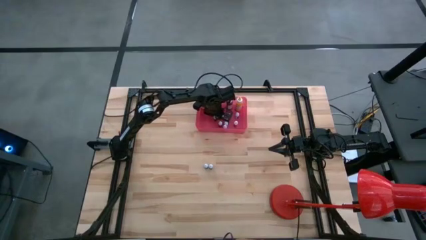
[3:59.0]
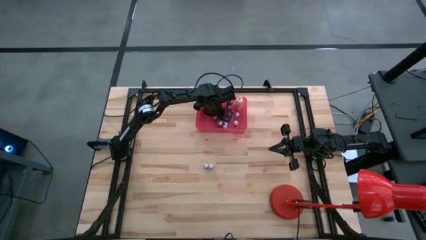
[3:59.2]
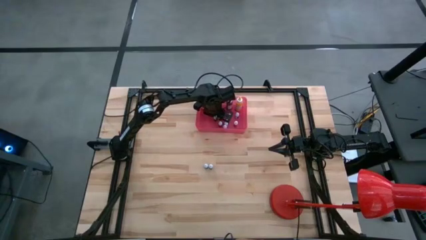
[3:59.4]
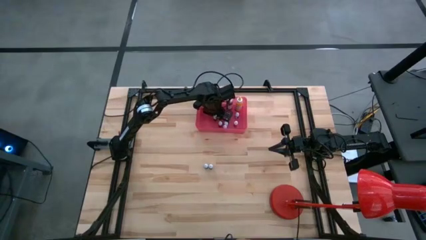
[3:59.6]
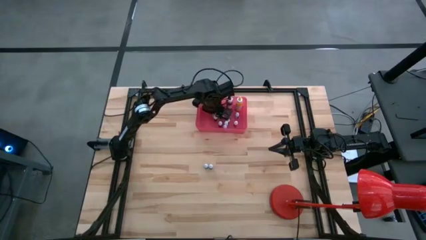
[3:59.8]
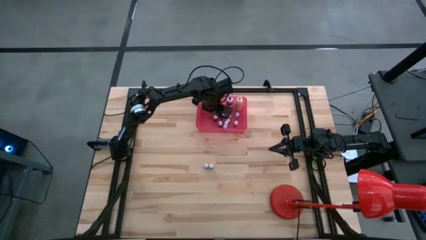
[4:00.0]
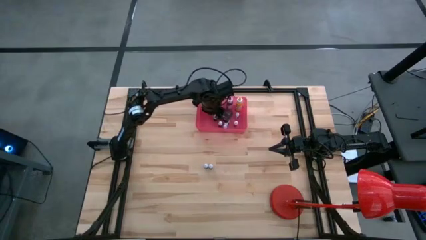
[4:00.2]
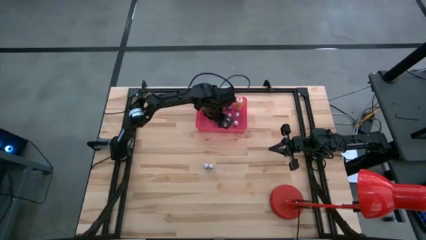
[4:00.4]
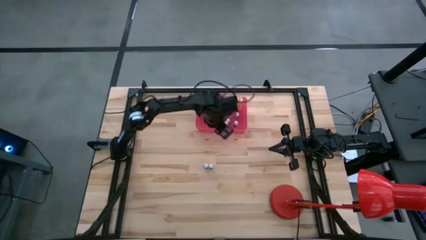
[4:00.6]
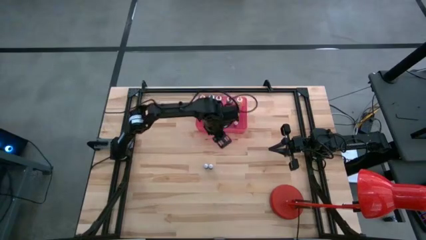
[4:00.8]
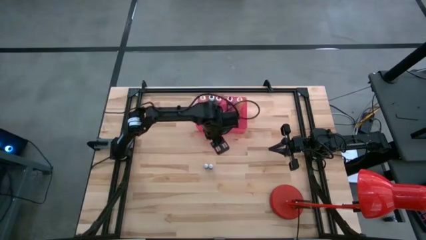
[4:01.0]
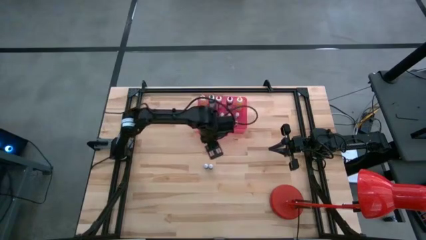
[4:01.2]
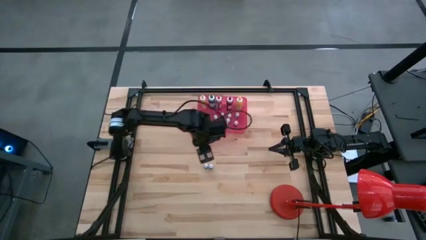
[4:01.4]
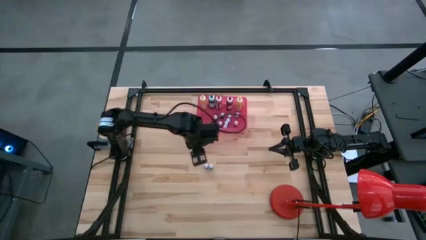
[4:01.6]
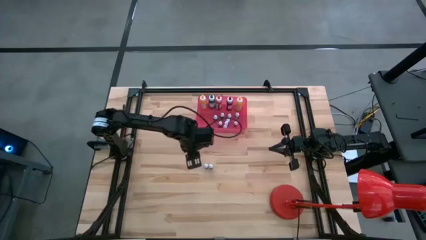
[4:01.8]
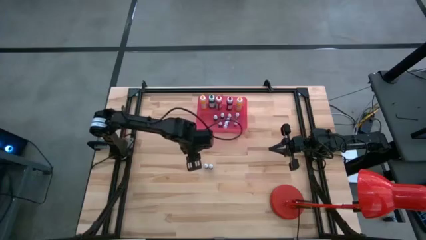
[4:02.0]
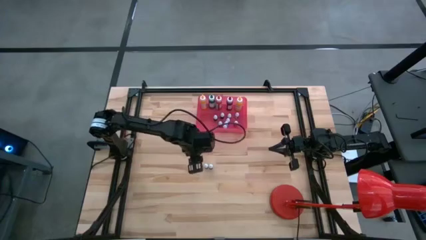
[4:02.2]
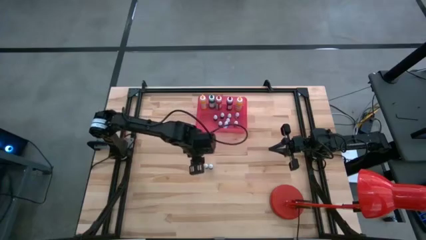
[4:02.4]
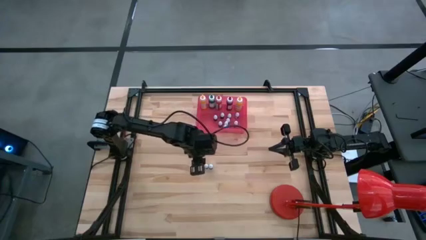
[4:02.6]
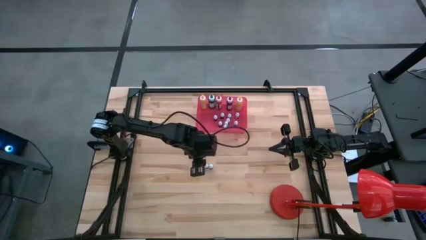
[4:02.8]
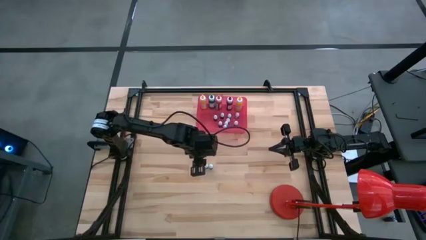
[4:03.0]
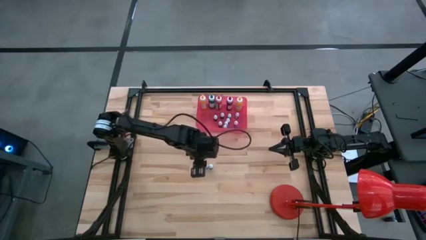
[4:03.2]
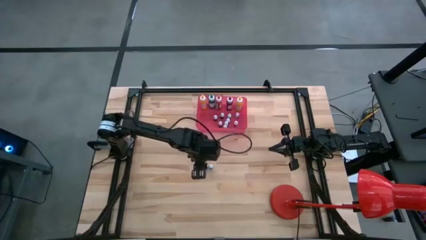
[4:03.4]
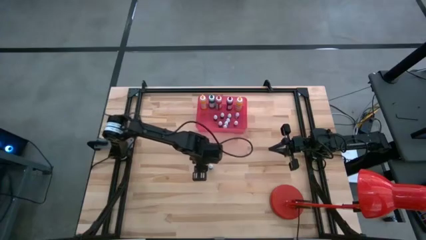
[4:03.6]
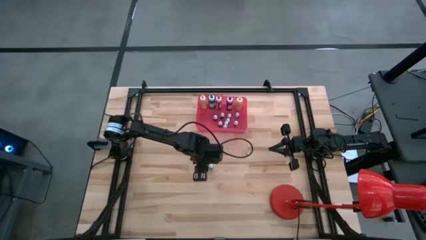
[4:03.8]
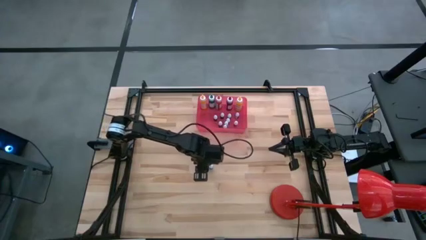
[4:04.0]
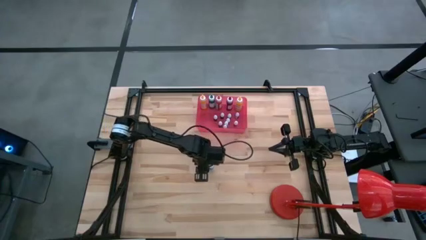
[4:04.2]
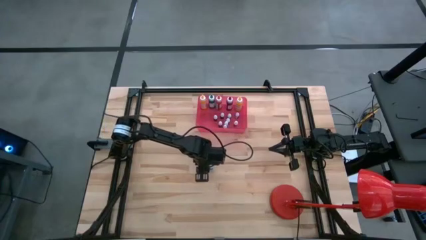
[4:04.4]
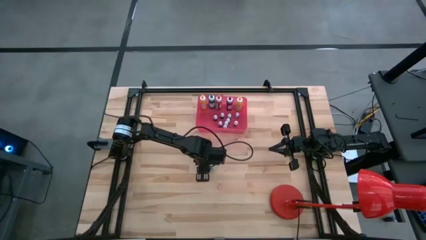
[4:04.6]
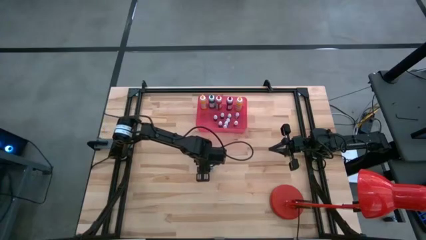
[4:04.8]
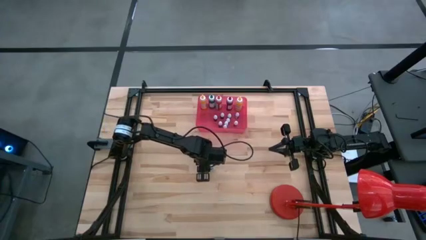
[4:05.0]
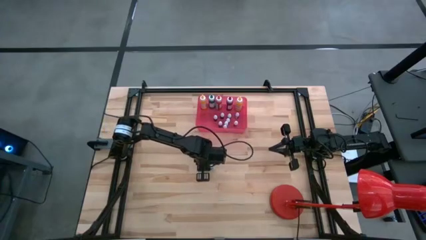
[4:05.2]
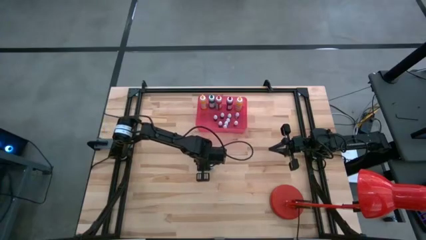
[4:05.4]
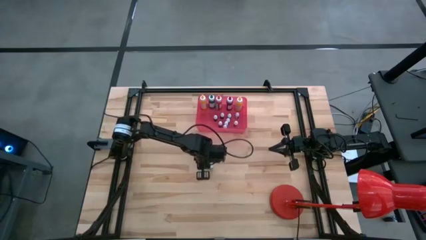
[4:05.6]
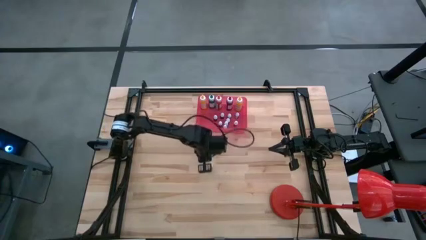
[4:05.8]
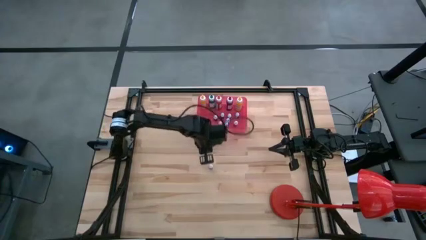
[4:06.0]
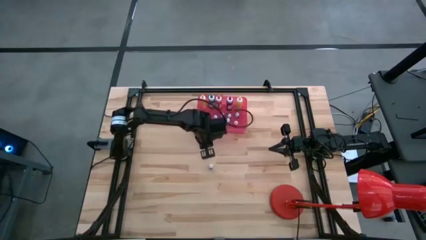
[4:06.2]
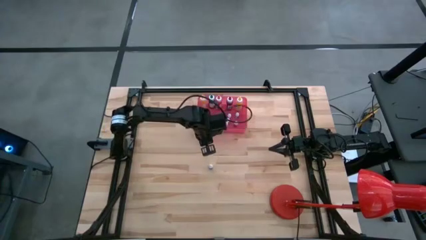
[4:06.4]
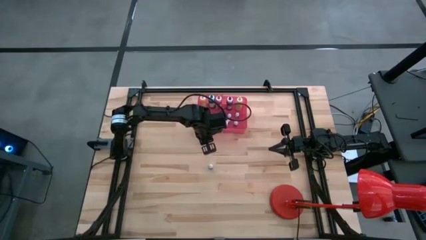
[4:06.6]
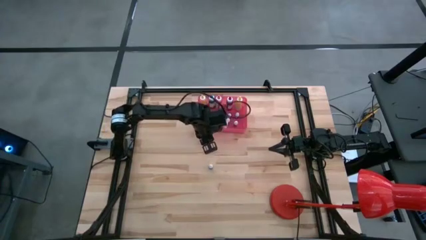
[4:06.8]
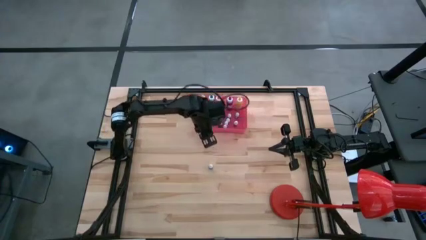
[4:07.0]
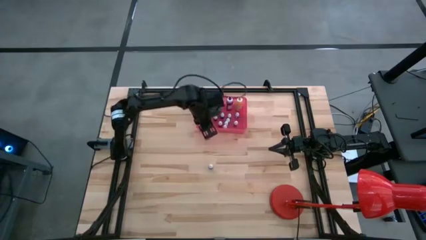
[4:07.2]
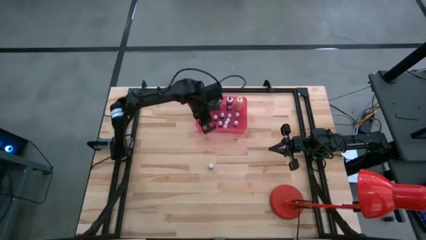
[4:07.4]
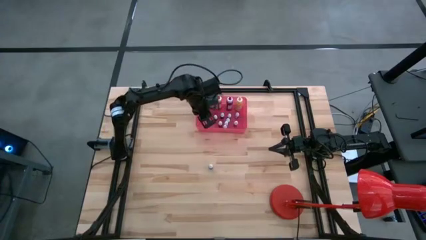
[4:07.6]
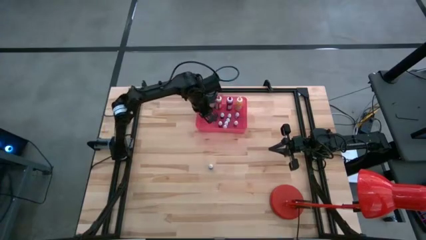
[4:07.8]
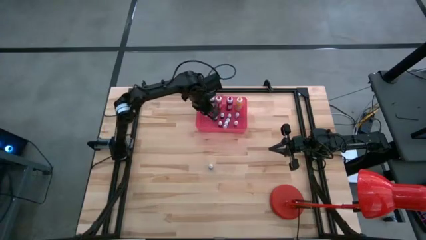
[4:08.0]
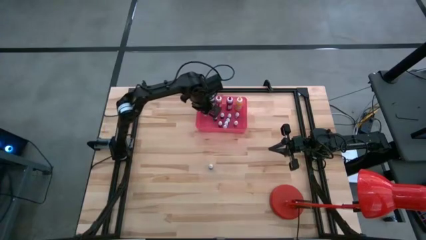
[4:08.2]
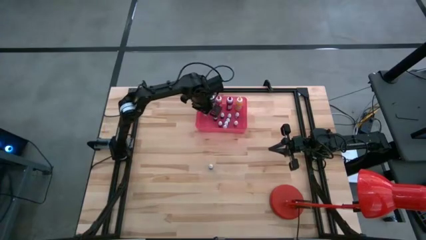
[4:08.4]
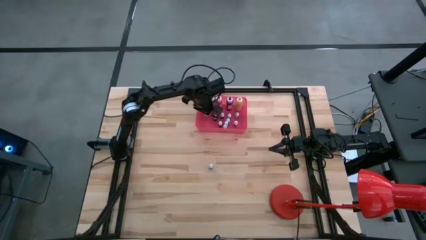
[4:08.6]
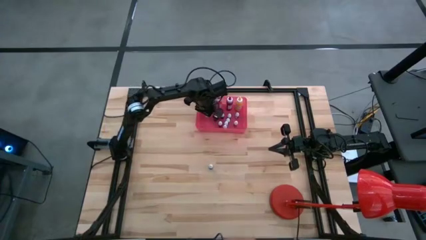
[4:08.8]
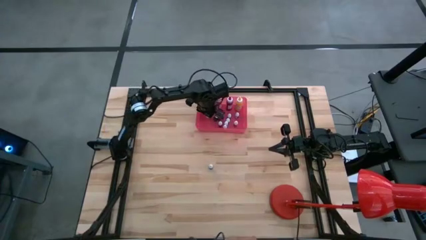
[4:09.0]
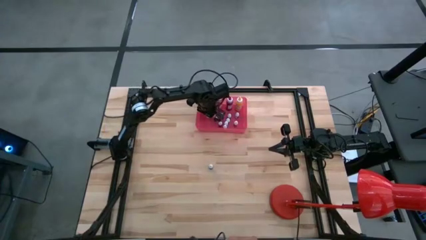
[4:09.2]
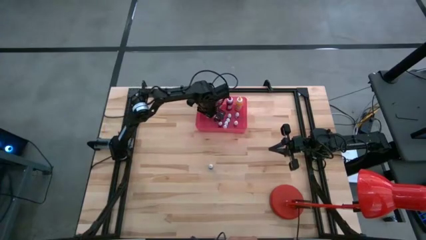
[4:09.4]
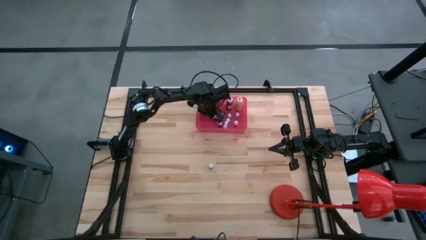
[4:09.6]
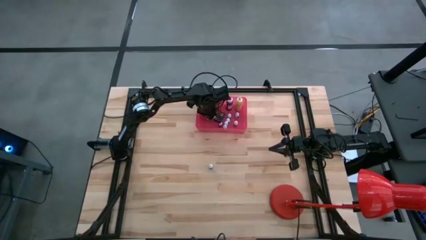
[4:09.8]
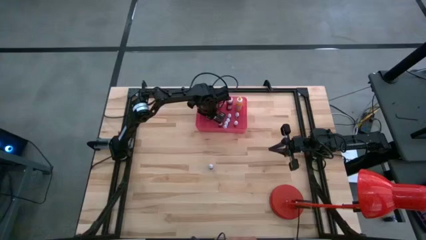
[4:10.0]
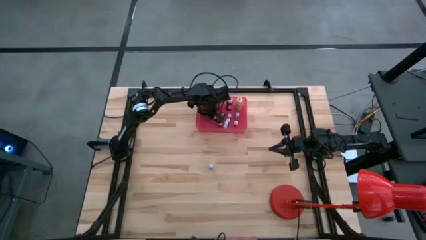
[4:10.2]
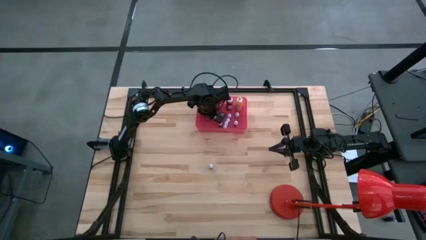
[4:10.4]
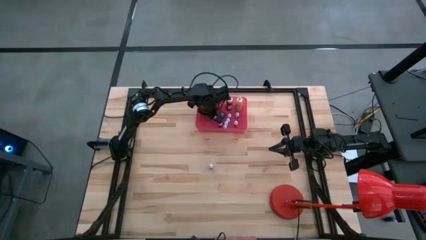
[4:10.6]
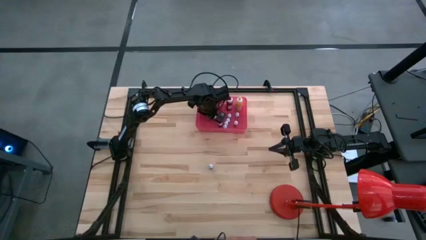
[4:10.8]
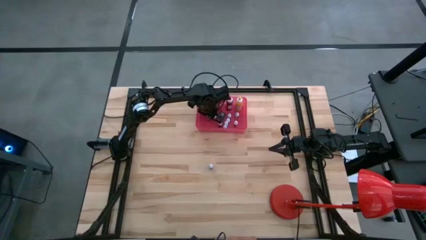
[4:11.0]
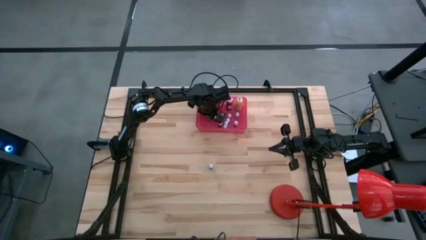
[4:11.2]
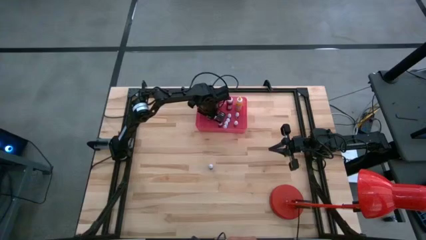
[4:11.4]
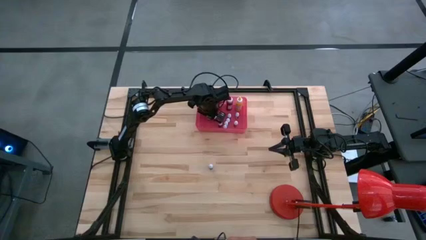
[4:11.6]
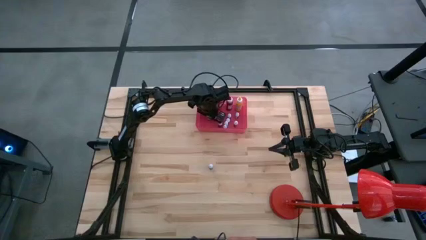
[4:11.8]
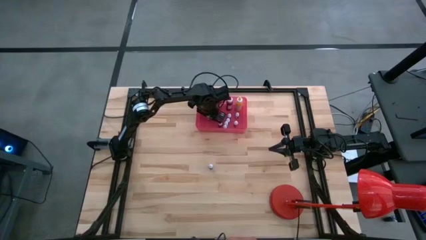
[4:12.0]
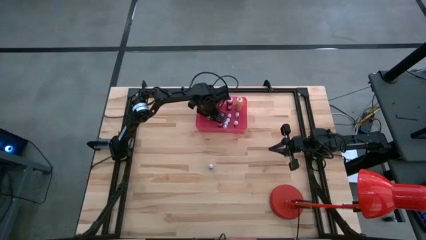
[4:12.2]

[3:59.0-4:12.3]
Task: Pick & Place food coloring
Put the small red food coloring bottle into the pink bin

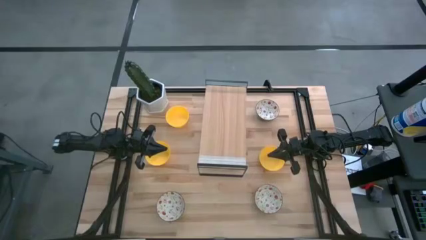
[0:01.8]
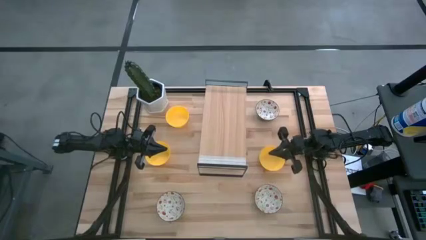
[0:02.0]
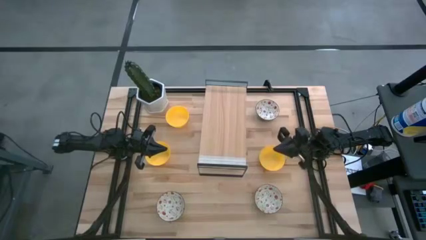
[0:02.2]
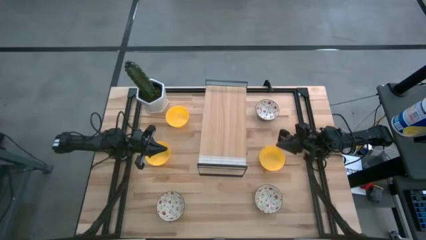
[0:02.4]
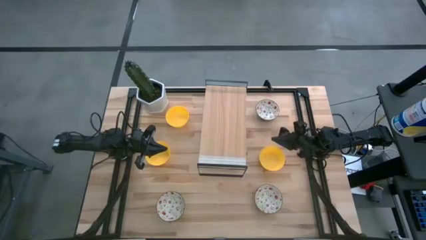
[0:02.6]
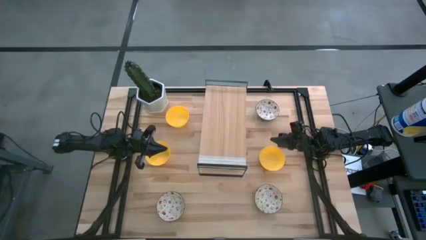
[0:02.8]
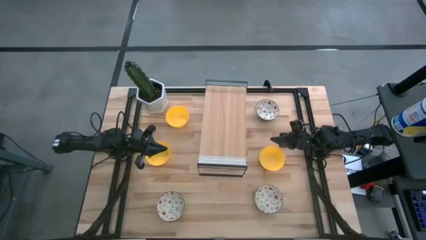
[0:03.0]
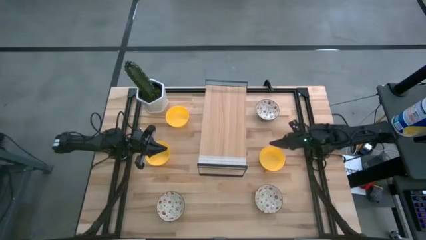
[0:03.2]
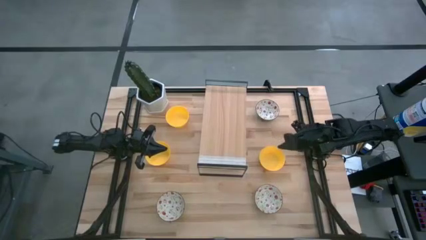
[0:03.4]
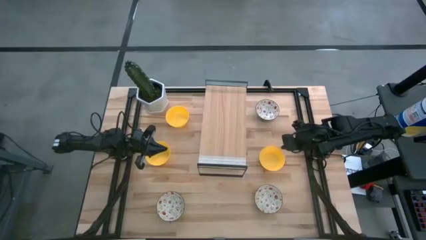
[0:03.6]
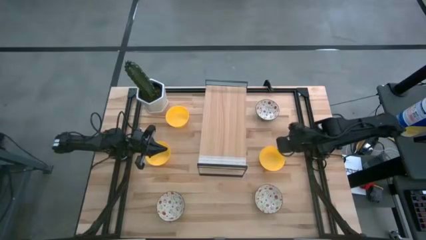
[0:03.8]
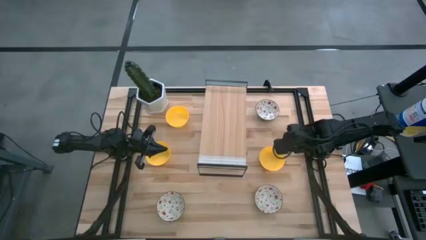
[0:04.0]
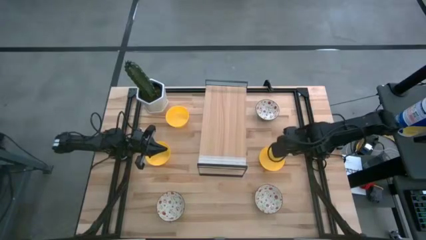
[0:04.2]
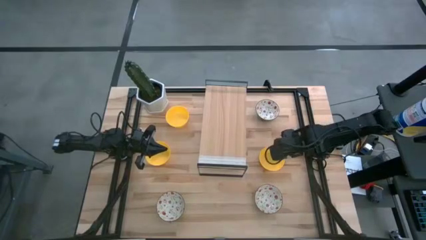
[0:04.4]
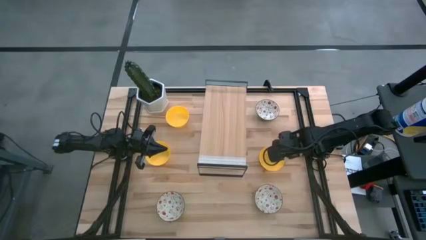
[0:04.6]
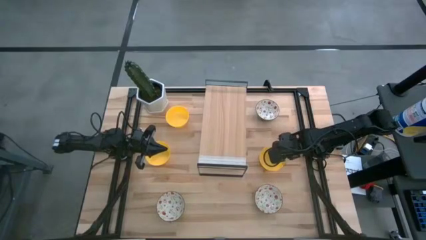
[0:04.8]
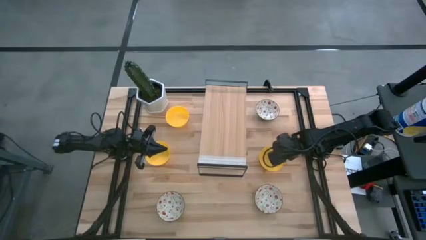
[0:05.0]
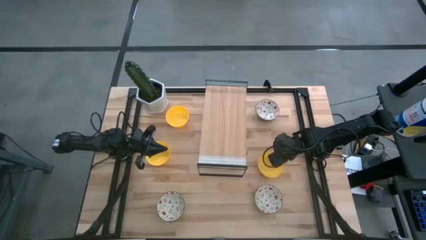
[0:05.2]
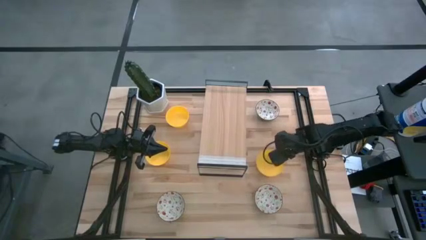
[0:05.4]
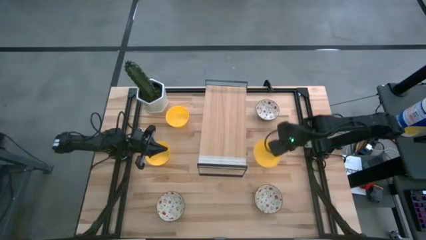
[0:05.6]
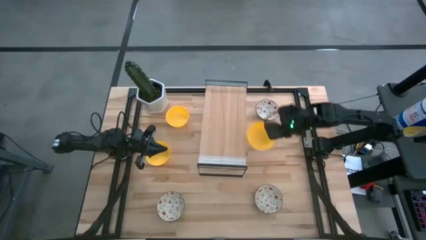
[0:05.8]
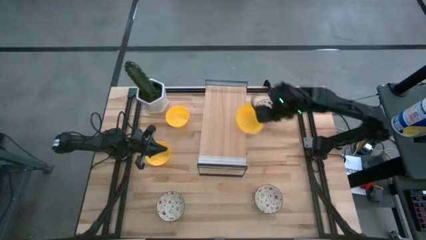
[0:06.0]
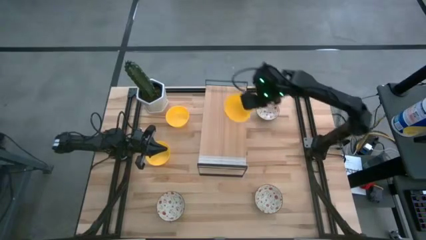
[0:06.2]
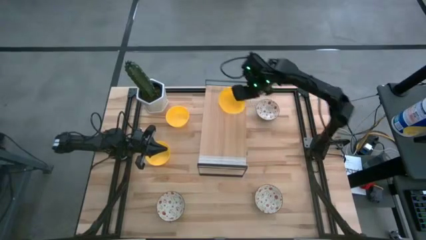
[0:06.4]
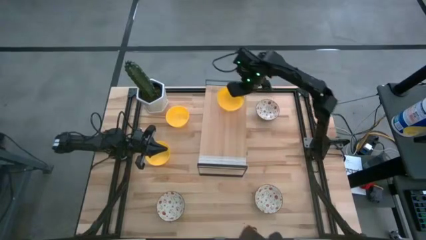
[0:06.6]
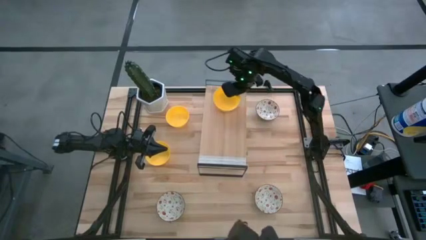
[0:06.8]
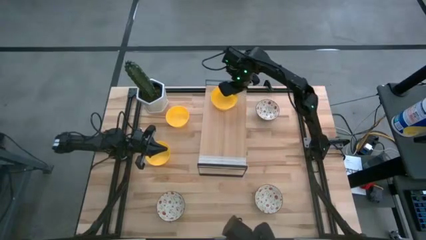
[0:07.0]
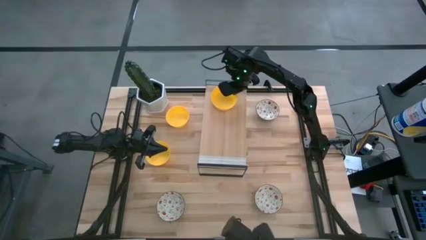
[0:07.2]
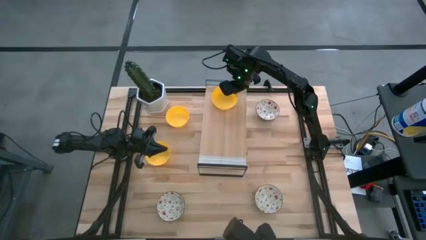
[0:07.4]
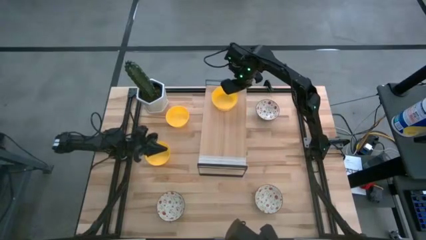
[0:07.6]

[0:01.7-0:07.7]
Task: Pick & Place Mini bowls
Put the middle right yellow bowl on the shelf
